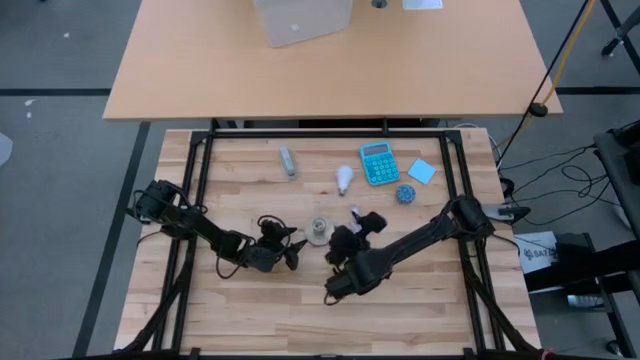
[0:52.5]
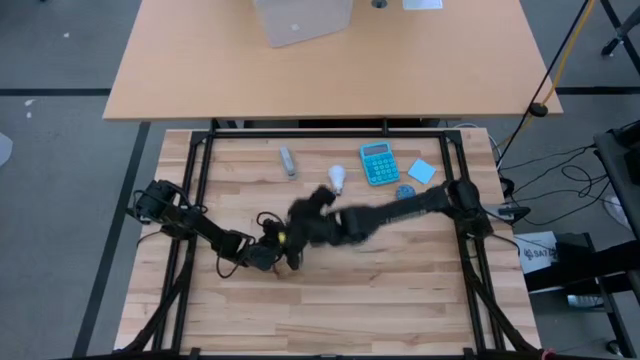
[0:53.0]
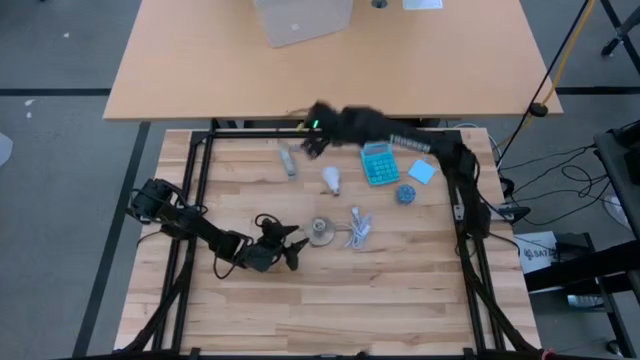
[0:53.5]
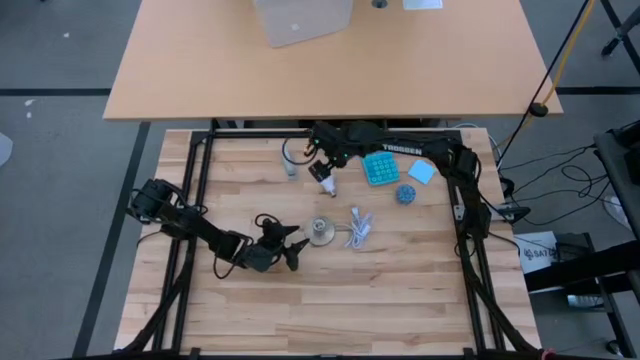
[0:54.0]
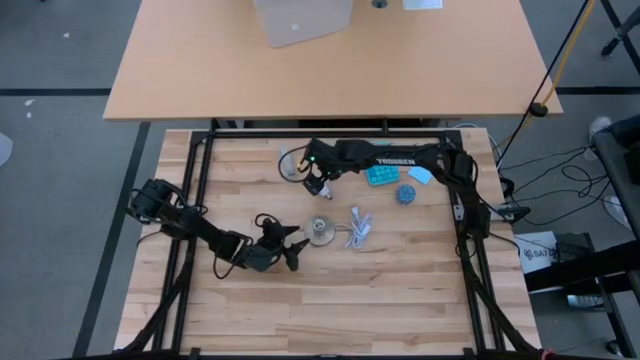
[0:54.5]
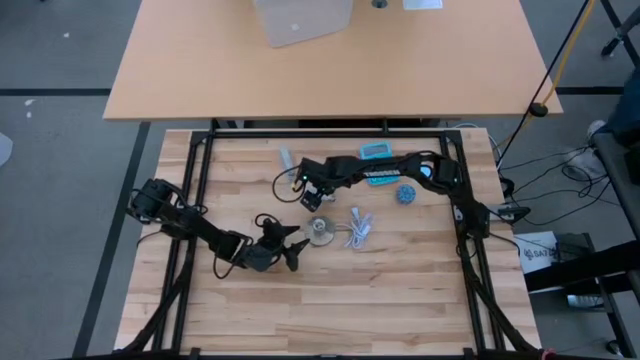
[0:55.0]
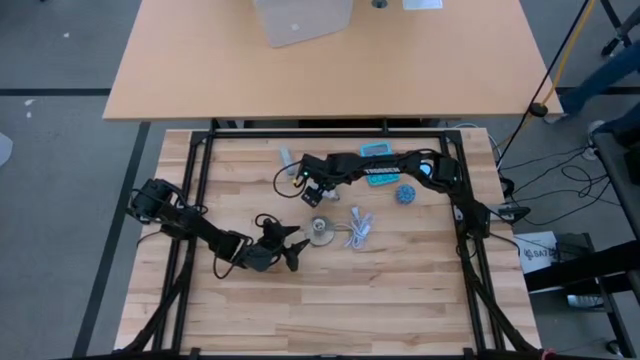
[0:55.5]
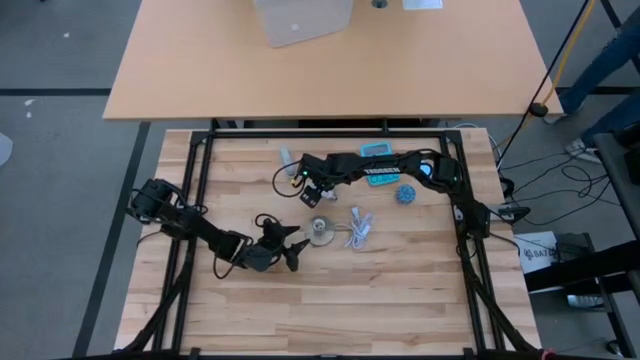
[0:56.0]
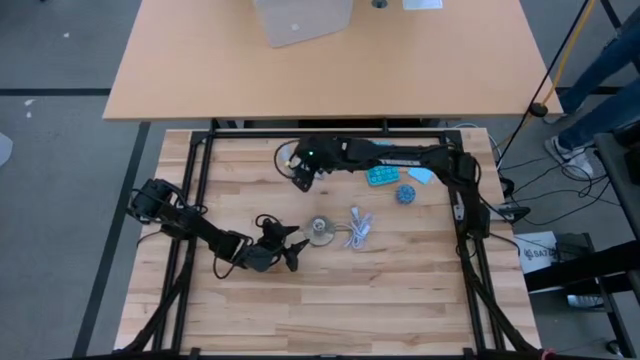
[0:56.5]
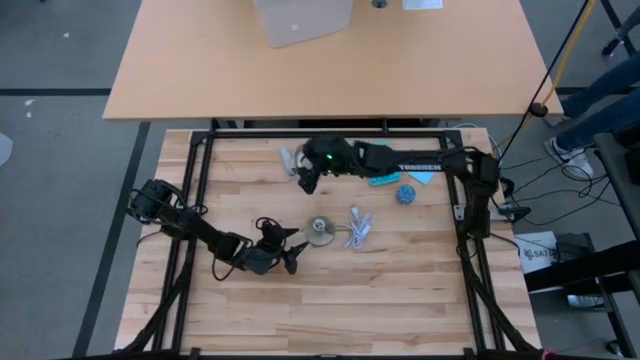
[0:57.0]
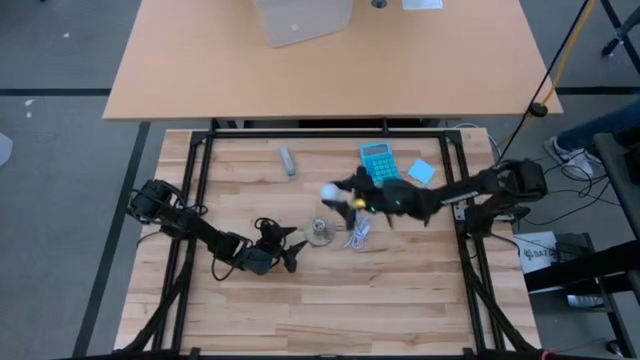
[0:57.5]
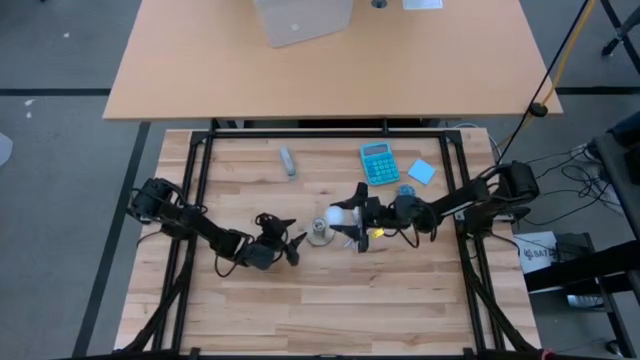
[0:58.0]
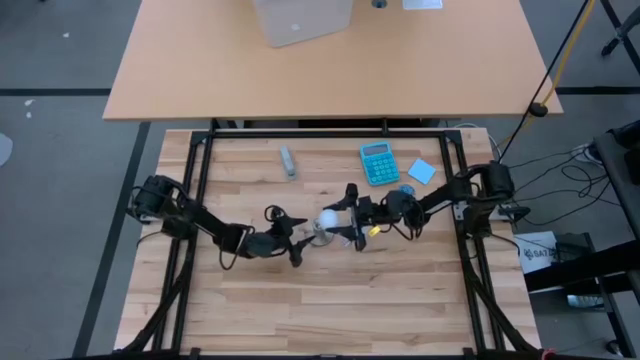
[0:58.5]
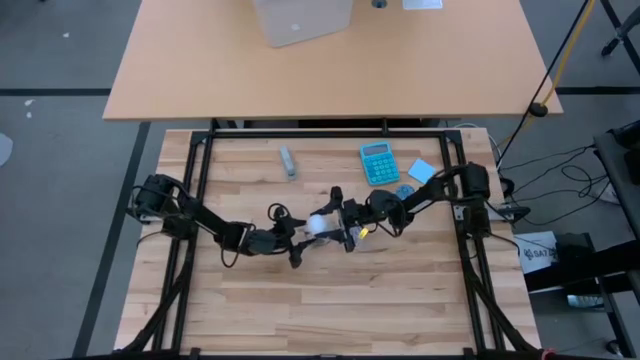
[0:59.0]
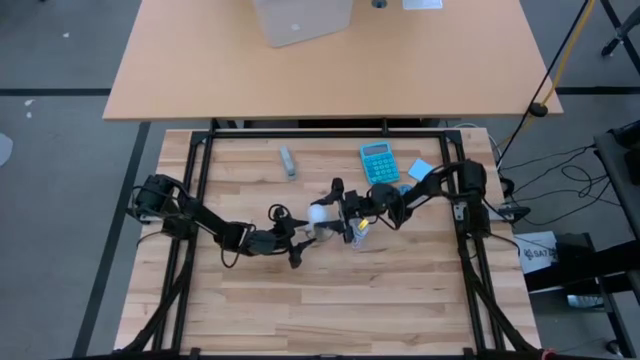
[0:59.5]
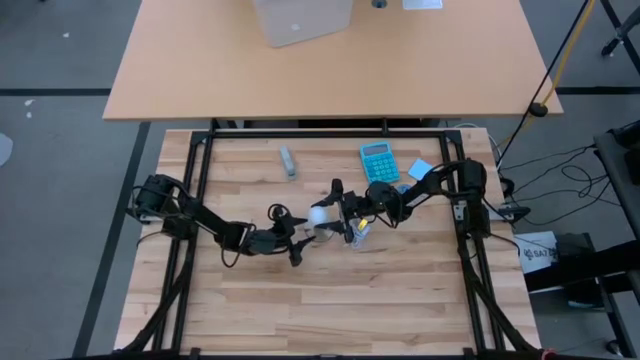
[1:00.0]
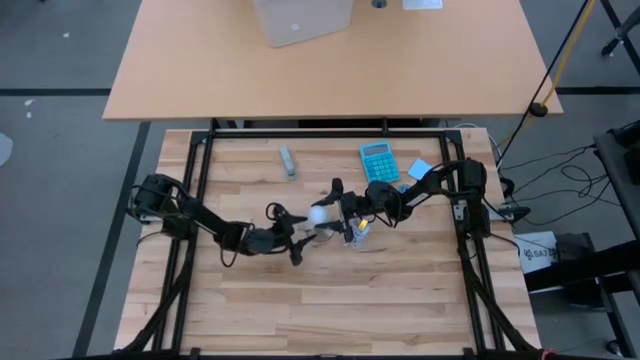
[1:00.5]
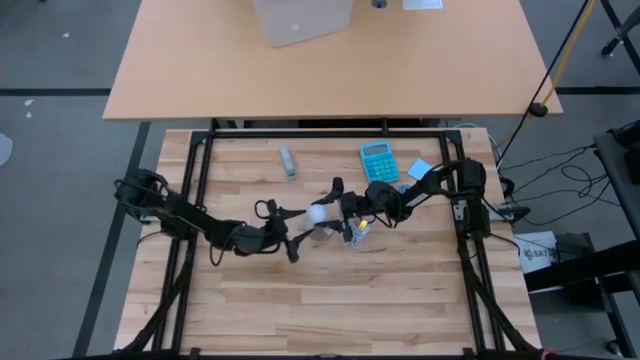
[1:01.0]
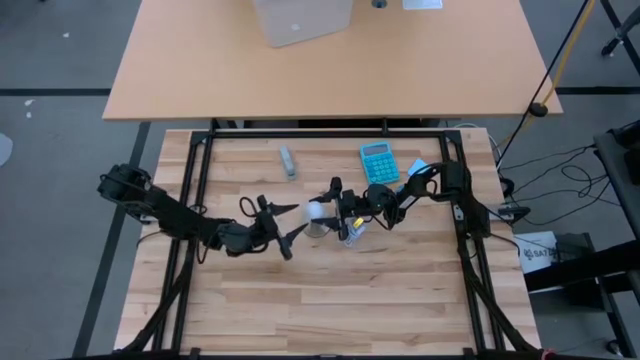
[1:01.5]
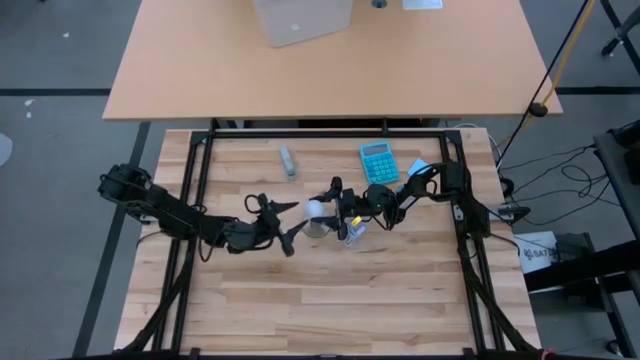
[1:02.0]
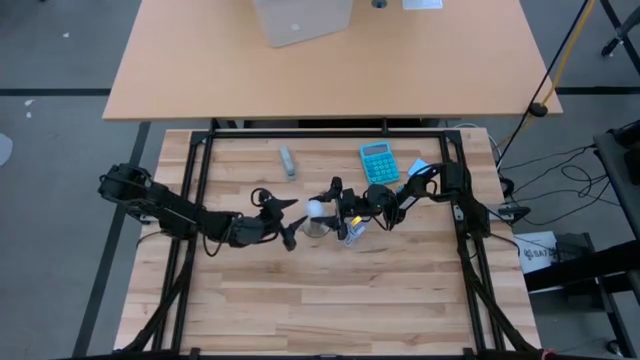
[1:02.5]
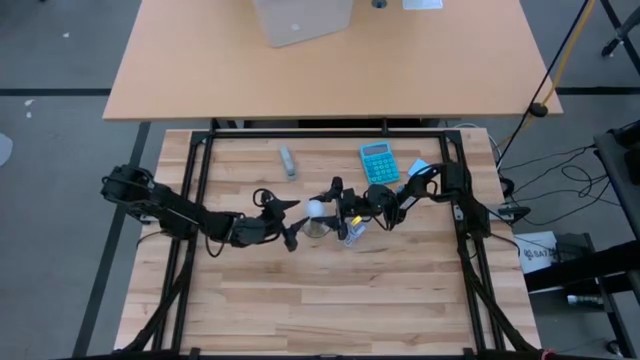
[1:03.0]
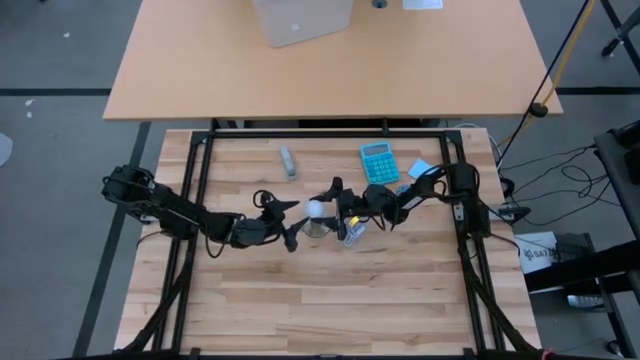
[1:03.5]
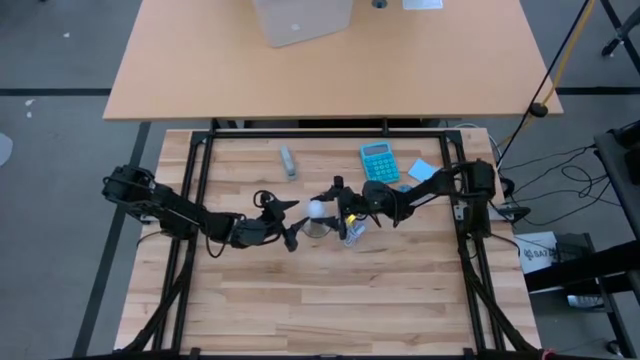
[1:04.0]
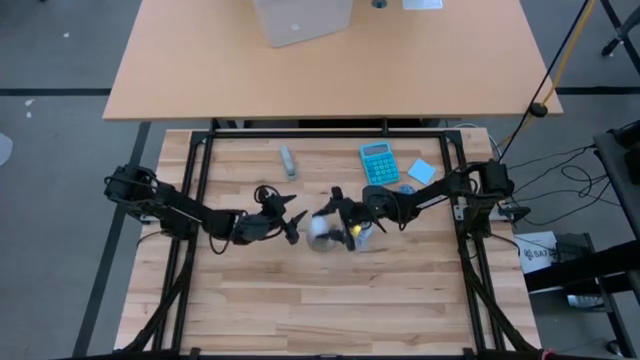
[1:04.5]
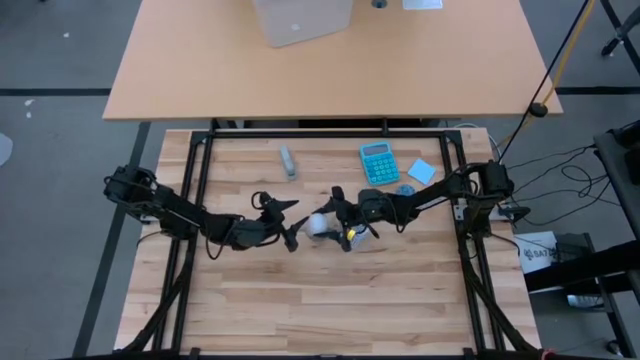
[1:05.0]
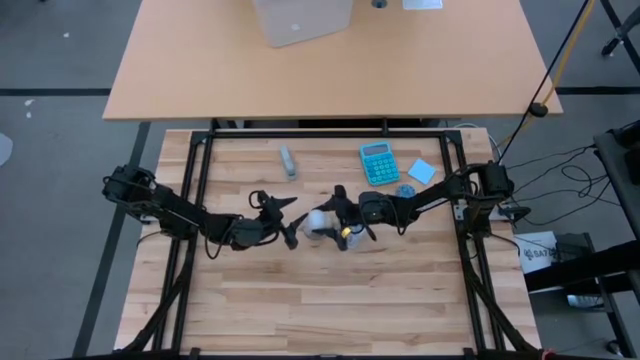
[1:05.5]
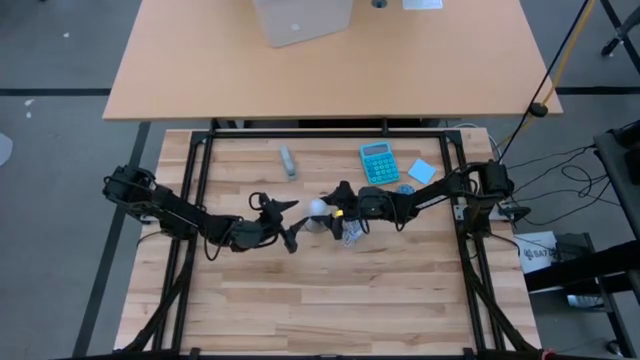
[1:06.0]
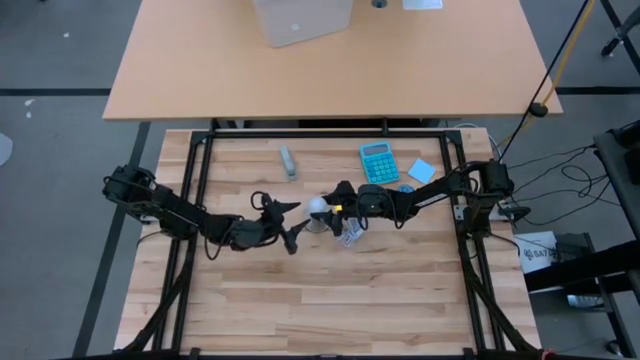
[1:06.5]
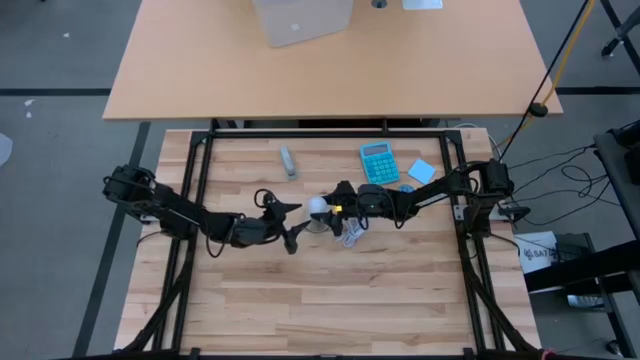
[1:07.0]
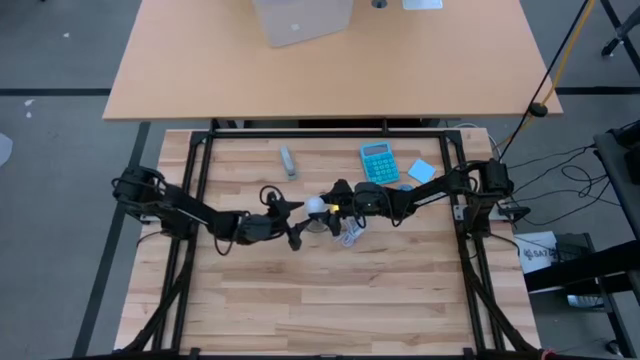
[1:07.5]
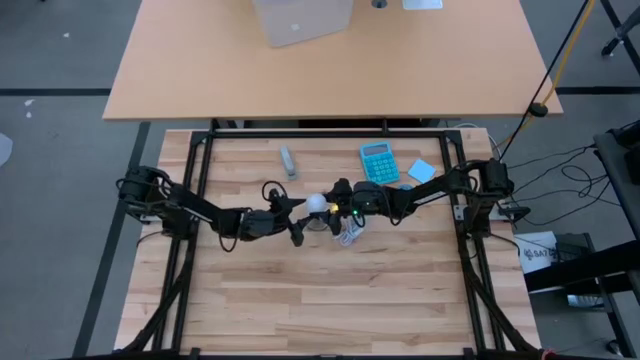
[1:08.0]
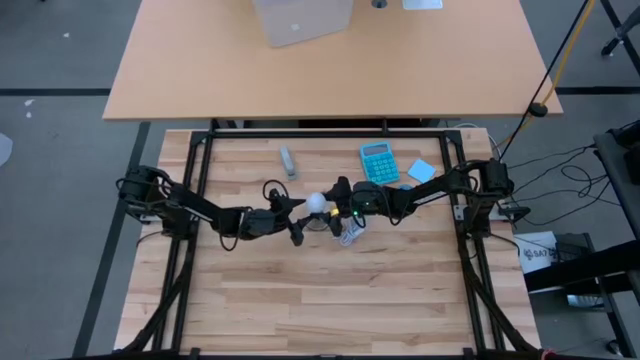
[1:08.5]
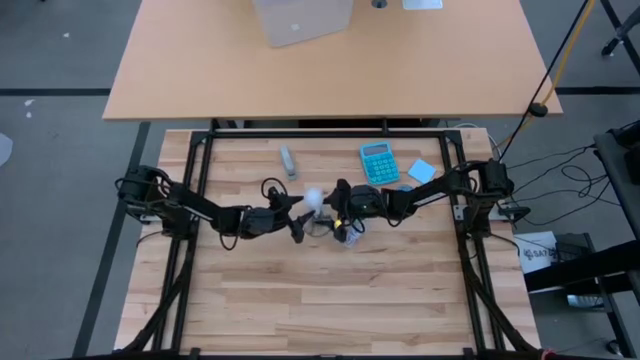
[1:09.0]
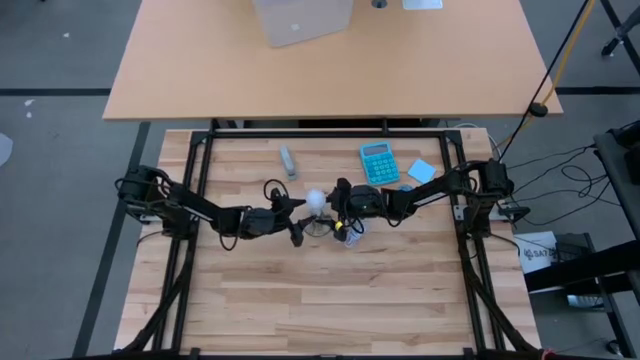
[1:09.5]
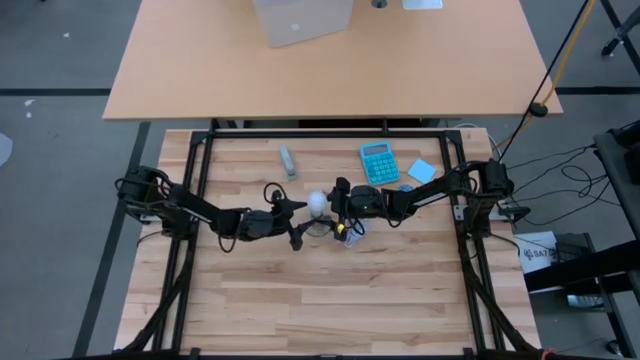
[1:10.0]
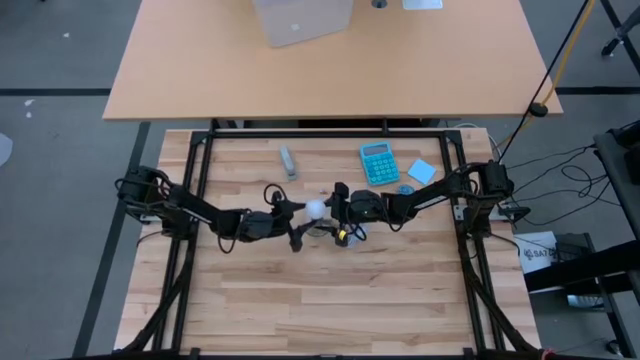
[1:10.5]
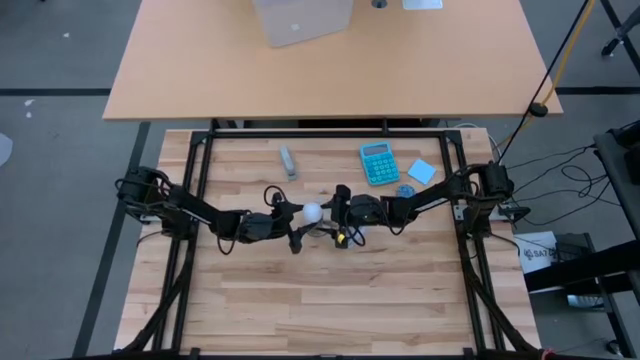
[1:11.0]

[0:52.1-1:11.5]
Task: Screw lightbulb
Insert the white lightbulb into the desk lamp

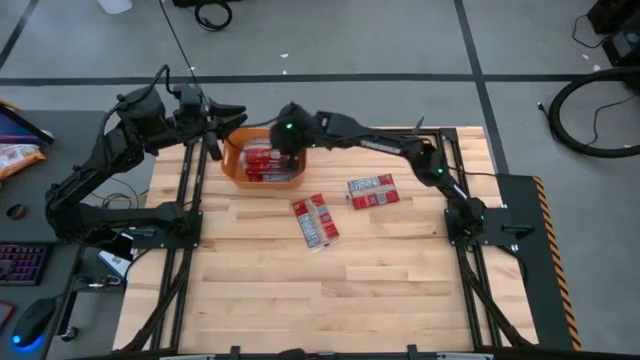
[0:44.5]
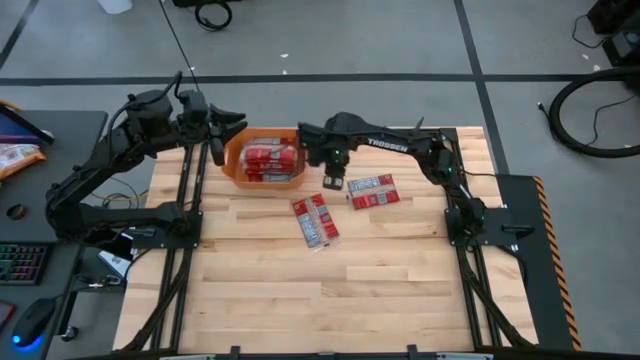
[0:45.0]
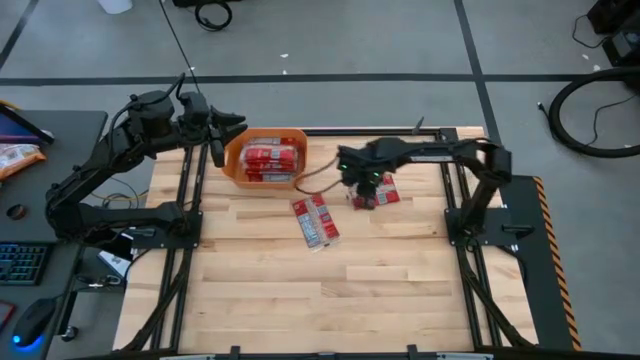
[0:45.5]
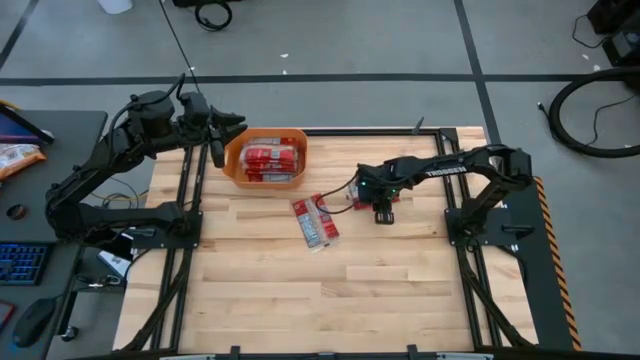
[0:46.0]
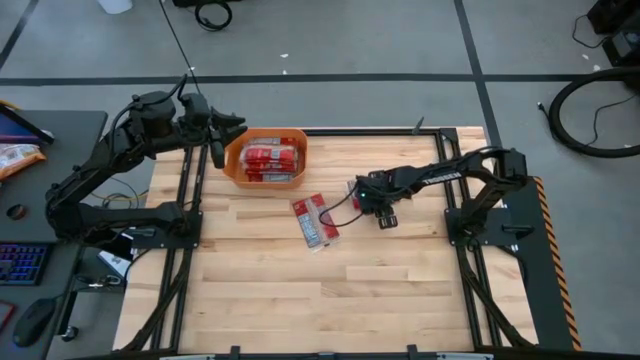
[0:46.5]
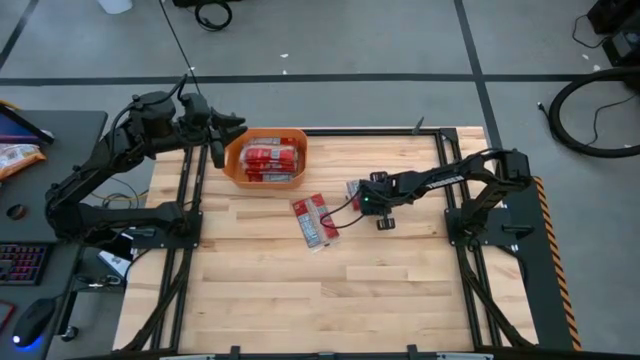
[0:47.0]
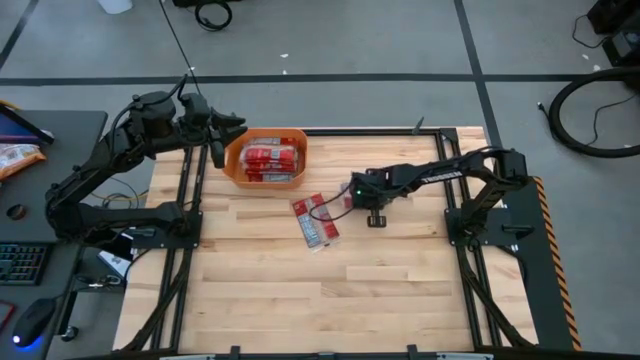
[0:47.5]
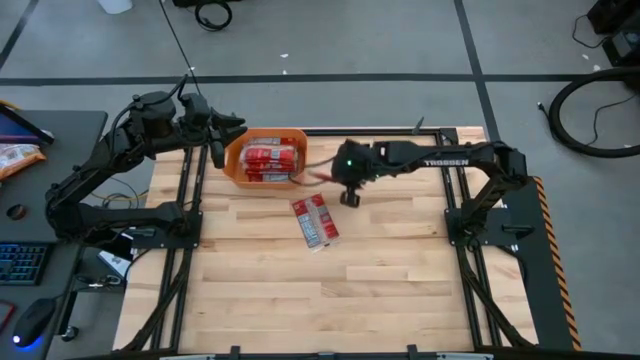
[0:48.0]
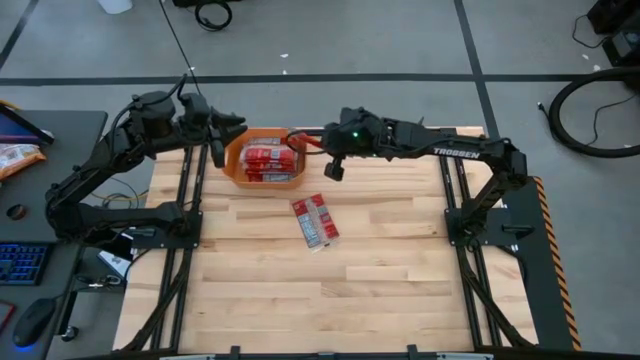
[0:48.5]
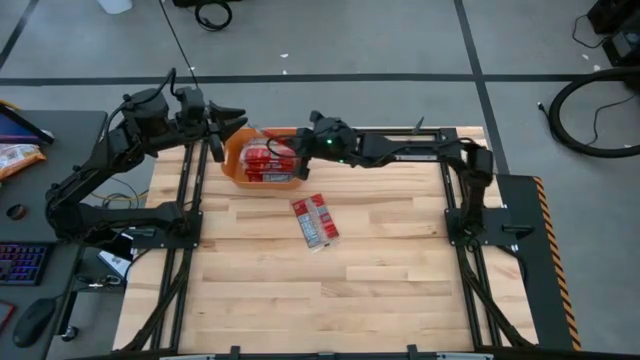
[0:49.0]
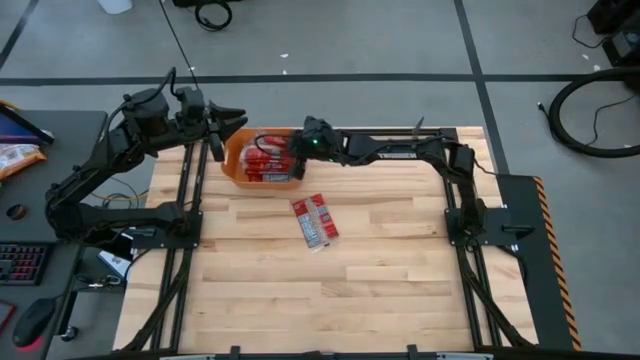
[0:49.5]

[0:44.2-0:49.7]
Task: Sort popcorn bags into baskets
Put the right red popcorn bag into the orange container
